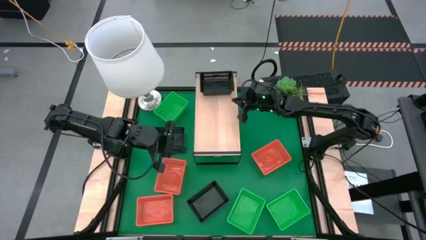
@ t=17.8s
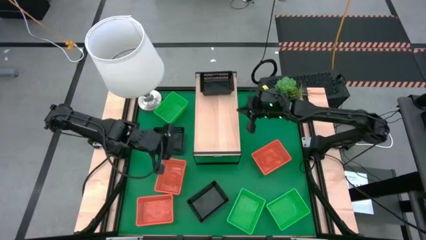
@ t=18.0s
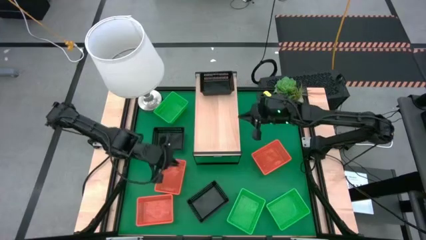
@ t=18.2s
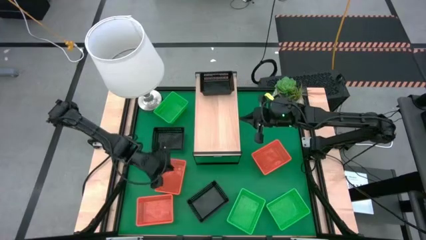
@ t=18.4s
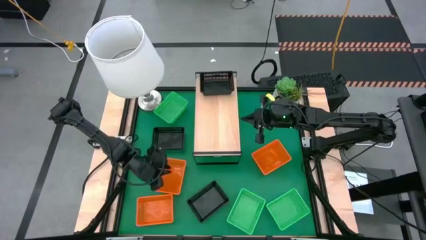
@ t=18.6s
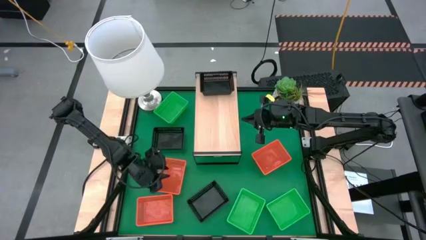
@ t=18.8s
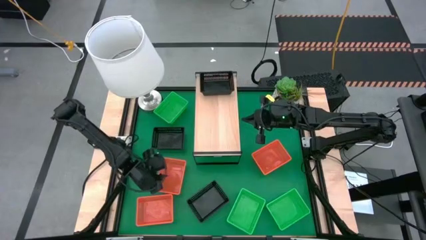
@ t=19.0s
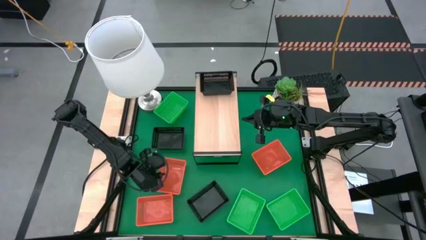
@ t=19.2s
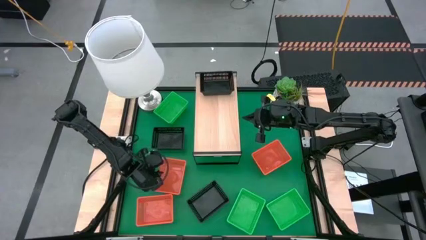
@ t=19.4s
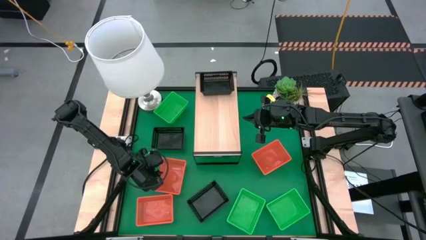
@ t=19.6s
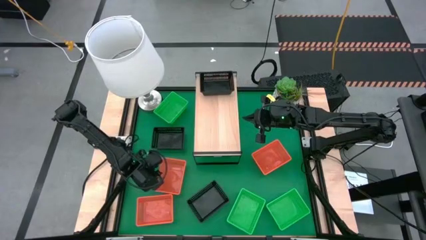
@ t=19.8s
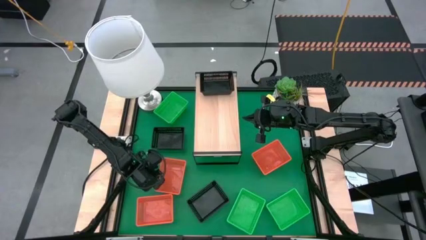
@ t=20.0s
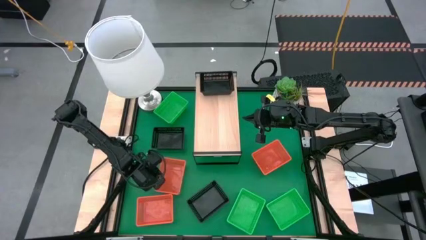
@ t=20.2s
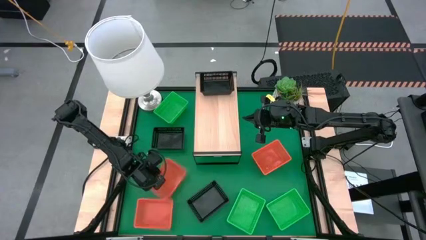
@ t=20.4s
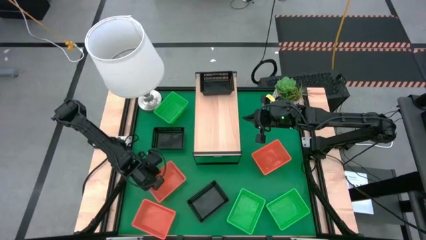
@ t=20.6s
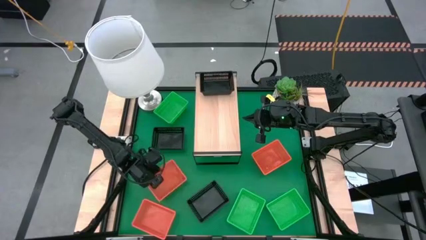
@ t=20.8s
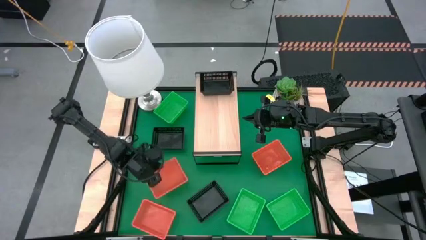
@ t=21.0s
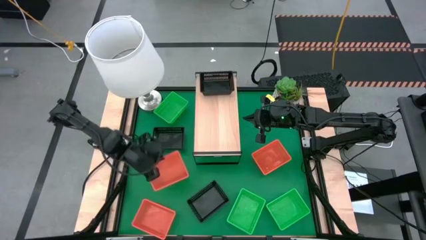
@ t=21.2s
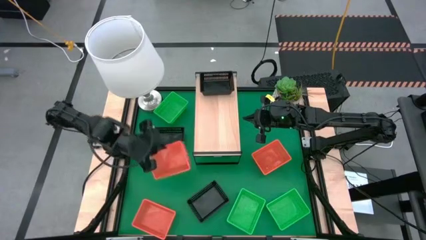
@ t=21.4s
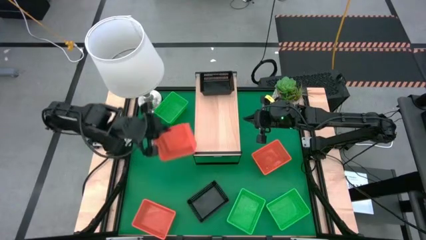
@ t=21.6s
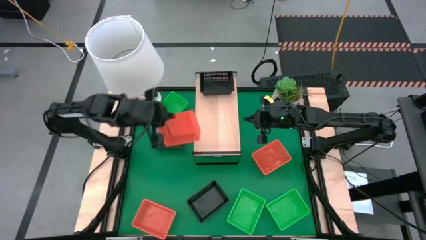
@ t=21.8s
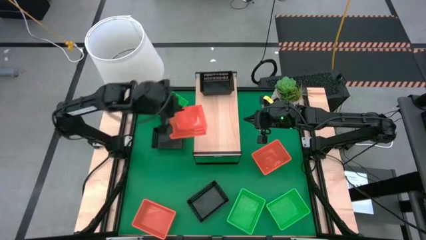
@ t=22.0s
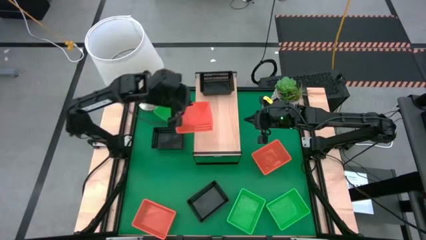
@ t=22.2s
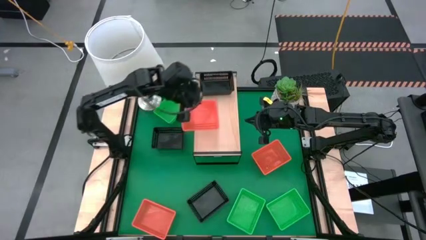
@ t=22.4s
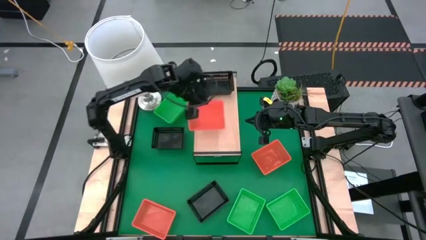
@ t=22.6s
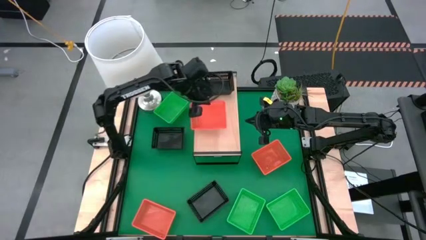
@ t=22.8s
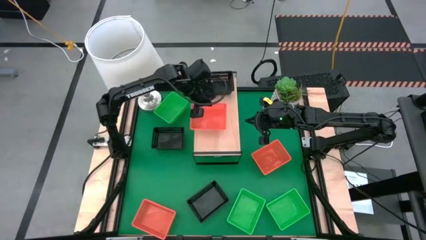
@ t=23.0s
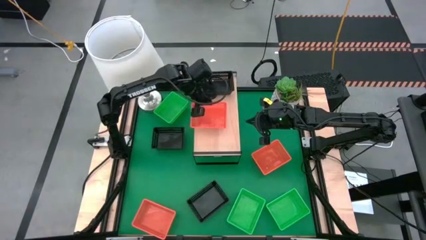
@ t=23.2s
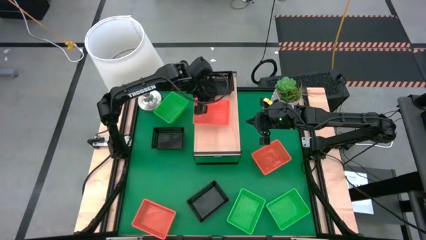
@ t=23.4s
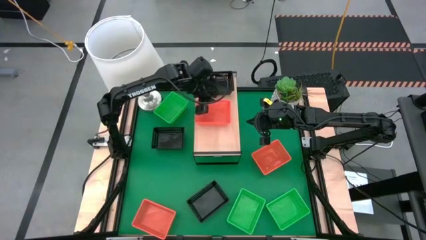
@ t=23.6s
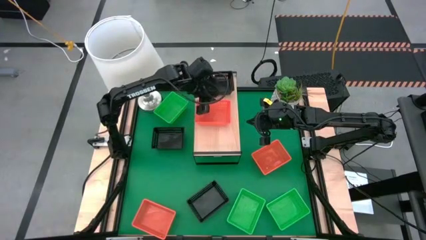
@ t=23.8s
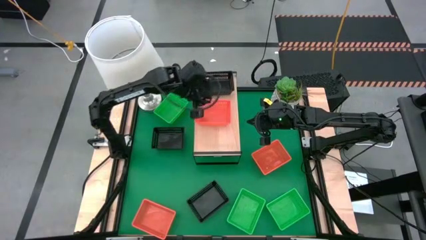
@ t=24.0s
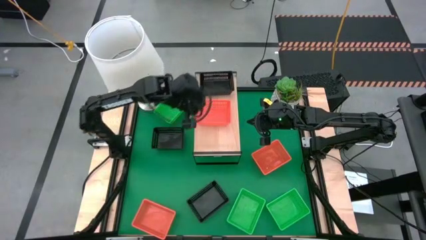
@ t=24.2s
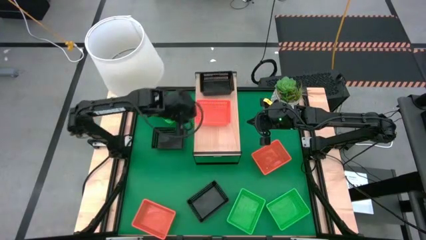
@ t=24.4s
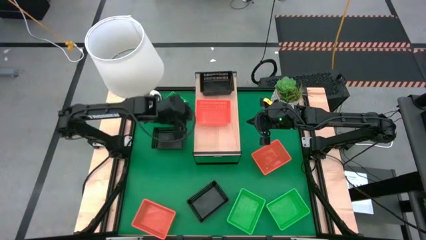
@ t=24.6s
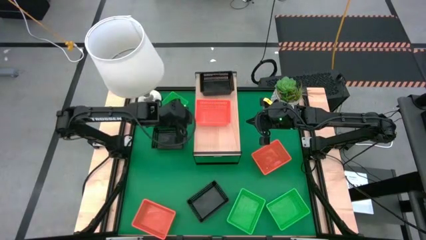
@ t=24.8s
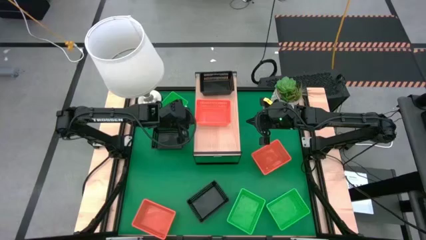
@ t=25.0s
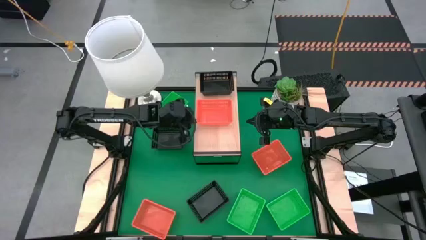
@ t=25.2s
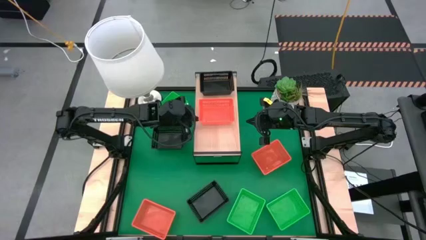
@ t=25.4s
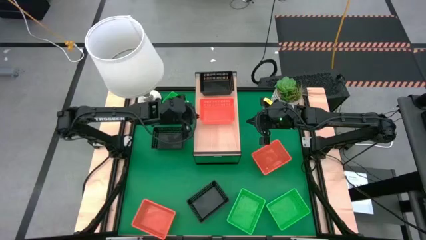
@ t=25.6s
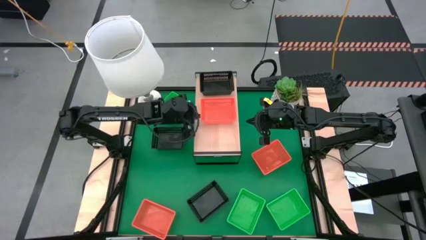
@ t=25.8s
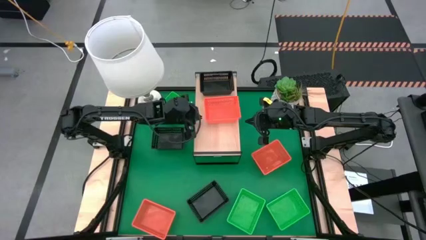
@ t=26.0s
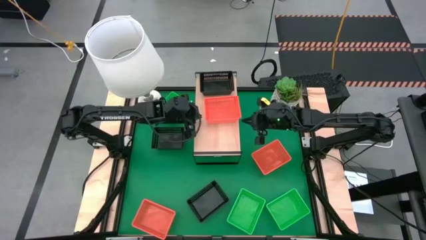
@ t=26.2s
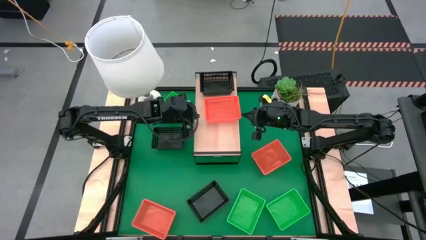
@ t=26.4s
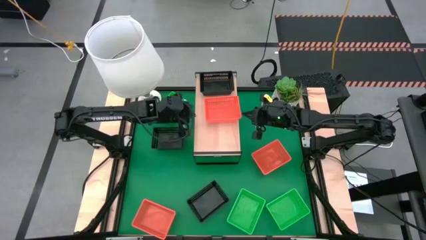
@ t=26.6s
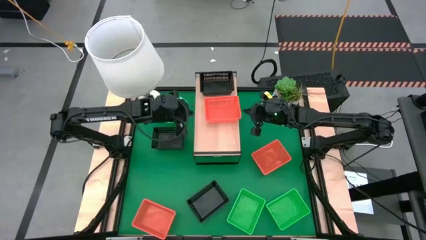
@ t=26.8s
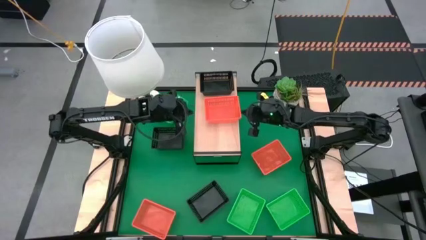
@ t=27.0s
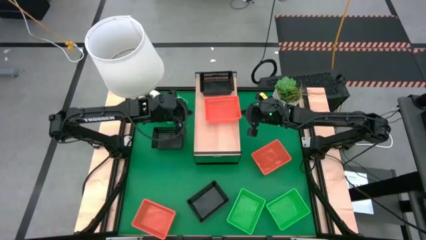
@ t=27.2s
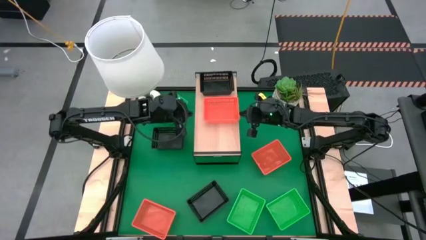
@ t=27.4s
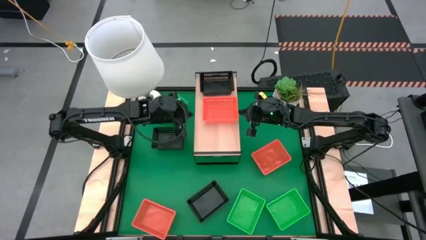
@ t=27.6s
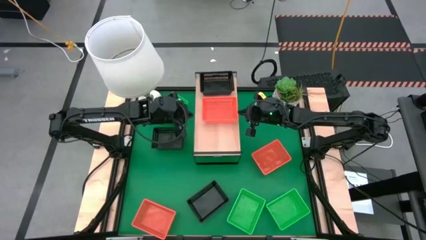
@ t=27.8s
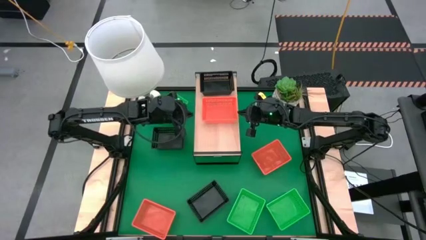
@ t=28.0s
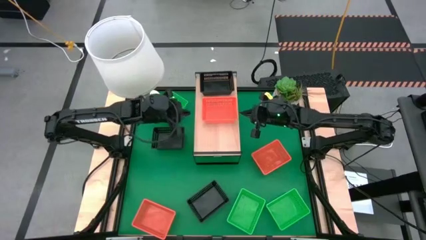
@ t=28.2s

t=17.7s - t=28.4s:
Task: Stack baskets on shelf by color
Put the top left orange bin on the shelf
